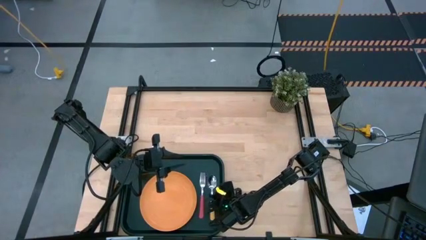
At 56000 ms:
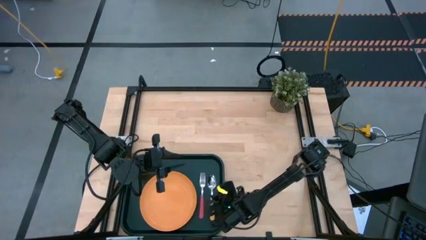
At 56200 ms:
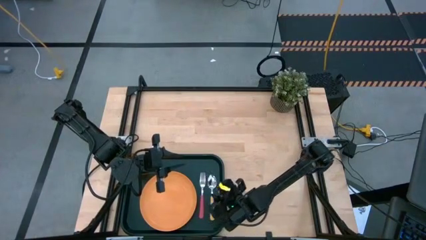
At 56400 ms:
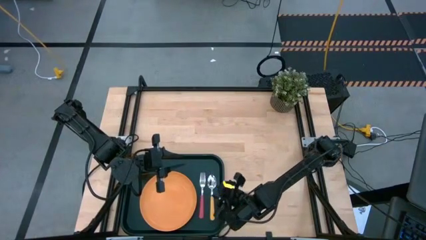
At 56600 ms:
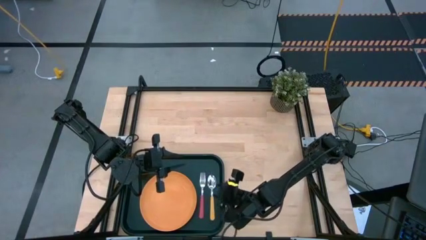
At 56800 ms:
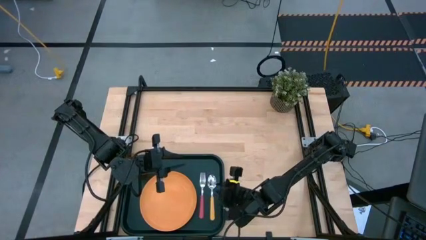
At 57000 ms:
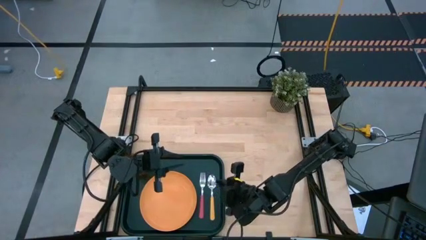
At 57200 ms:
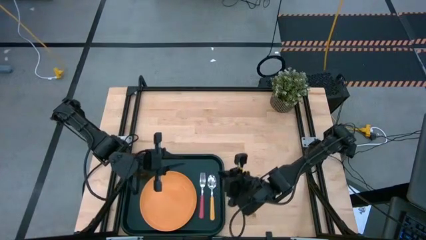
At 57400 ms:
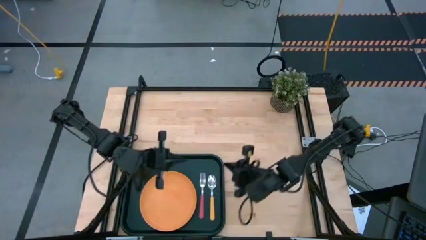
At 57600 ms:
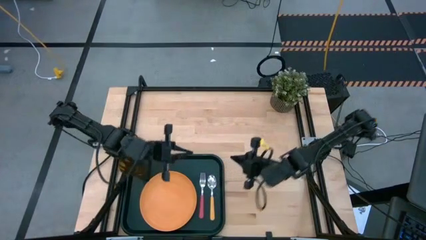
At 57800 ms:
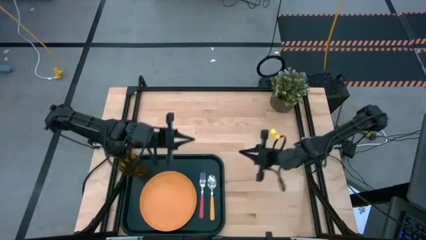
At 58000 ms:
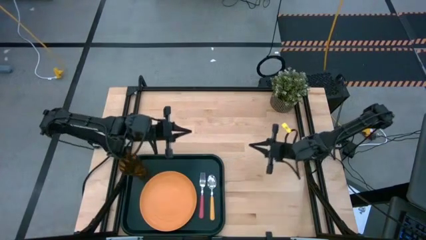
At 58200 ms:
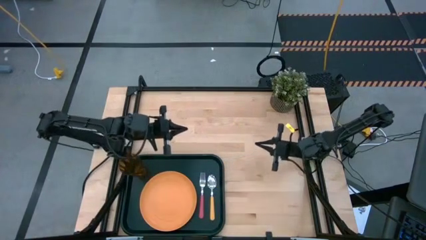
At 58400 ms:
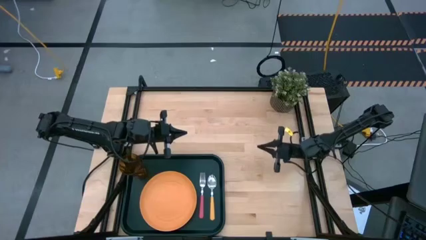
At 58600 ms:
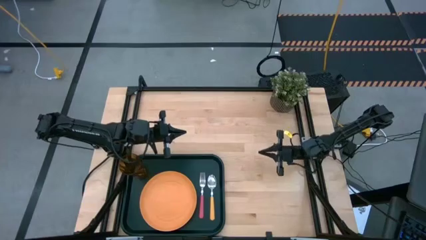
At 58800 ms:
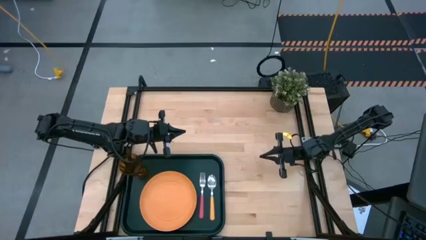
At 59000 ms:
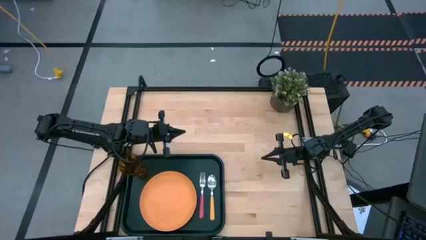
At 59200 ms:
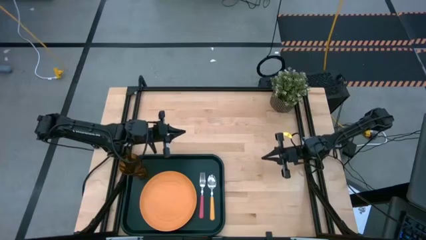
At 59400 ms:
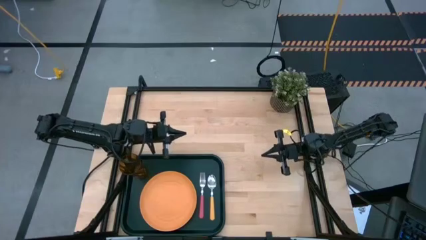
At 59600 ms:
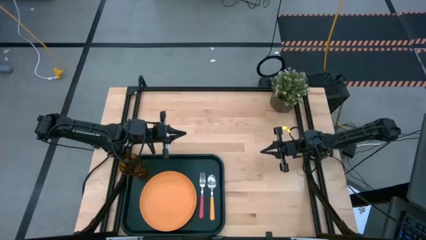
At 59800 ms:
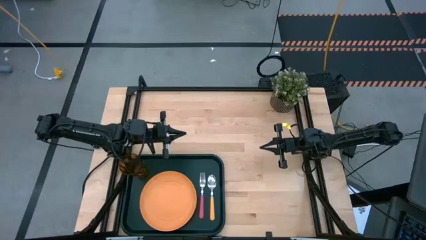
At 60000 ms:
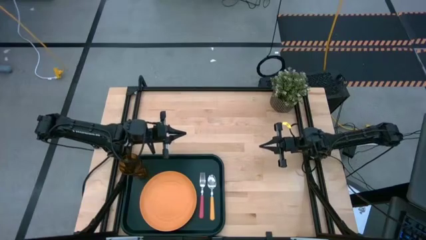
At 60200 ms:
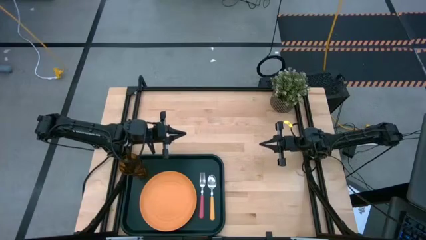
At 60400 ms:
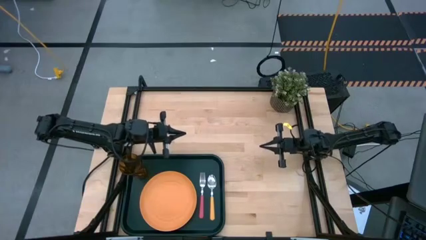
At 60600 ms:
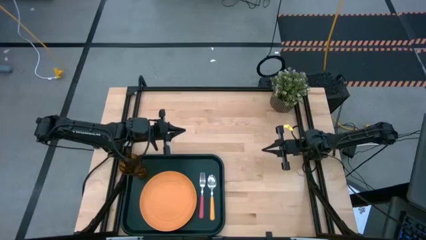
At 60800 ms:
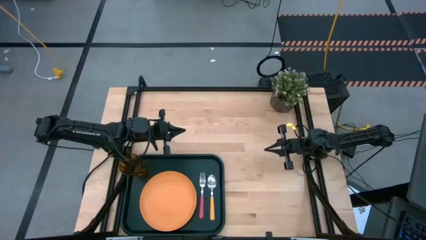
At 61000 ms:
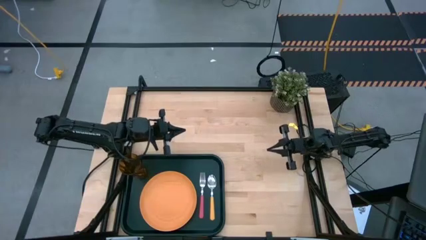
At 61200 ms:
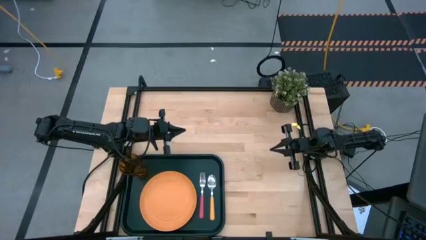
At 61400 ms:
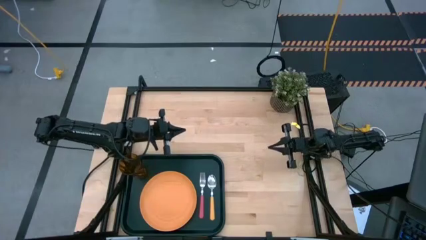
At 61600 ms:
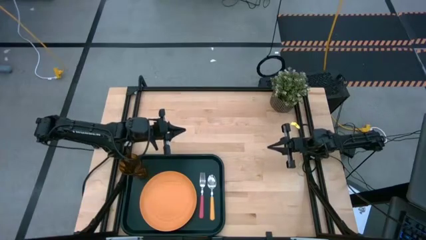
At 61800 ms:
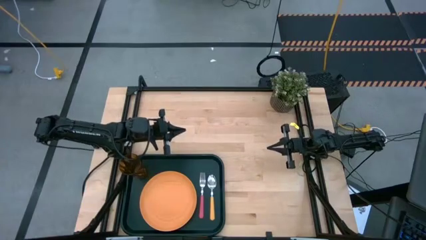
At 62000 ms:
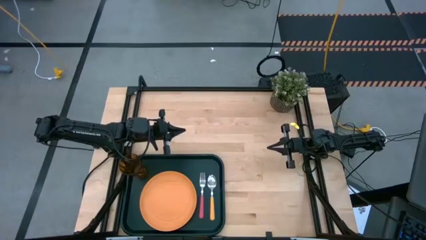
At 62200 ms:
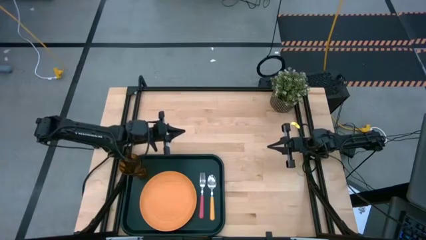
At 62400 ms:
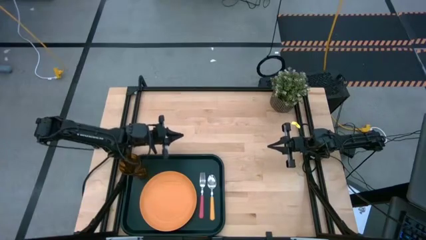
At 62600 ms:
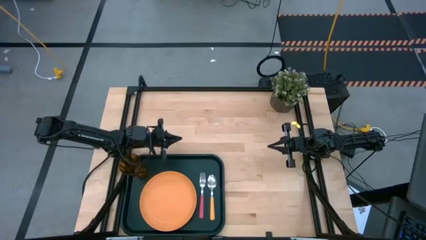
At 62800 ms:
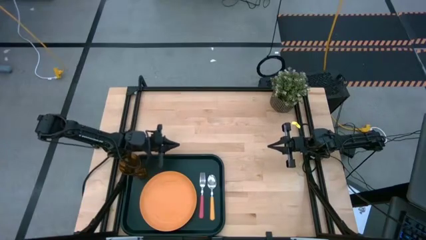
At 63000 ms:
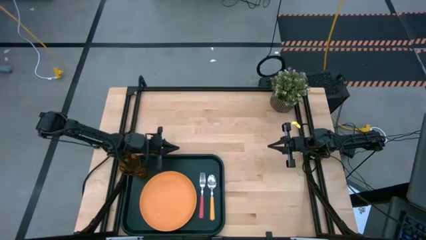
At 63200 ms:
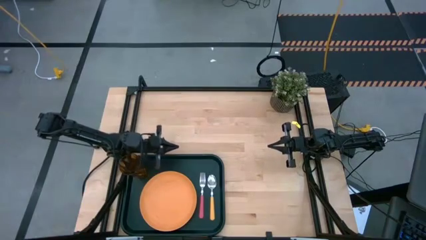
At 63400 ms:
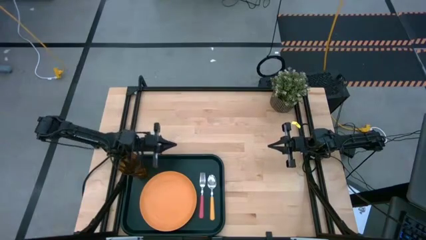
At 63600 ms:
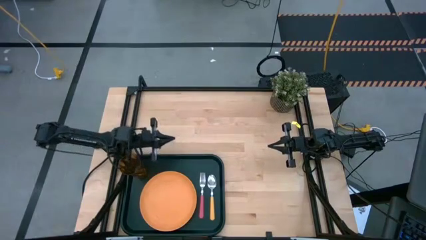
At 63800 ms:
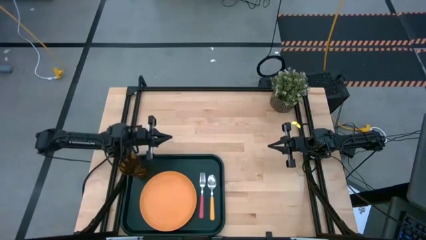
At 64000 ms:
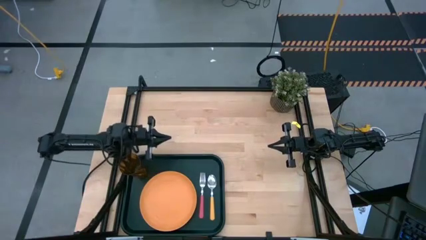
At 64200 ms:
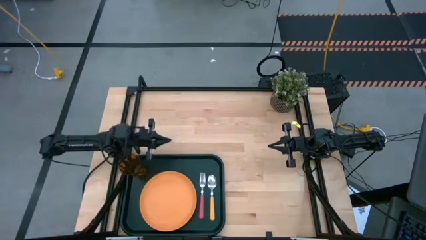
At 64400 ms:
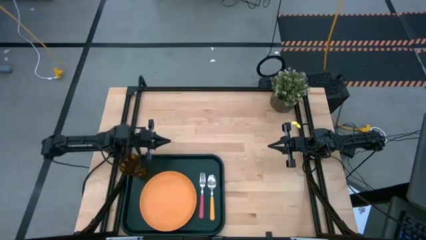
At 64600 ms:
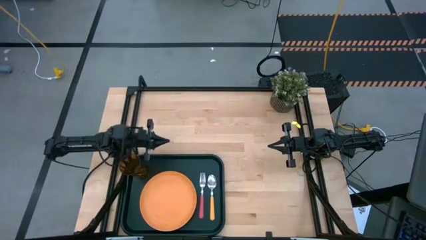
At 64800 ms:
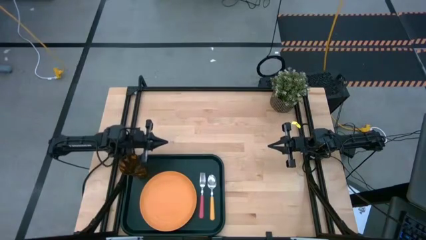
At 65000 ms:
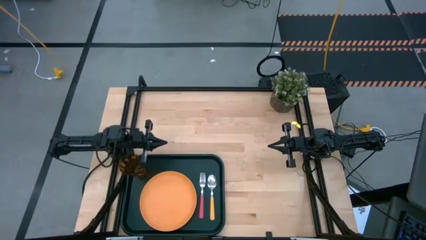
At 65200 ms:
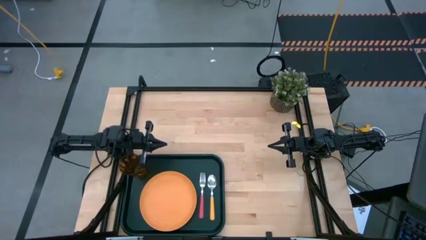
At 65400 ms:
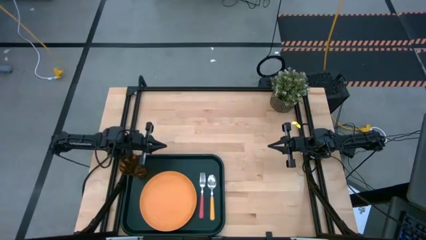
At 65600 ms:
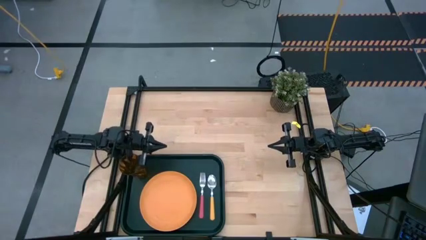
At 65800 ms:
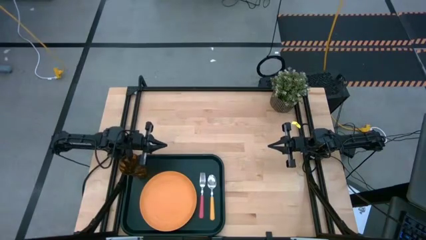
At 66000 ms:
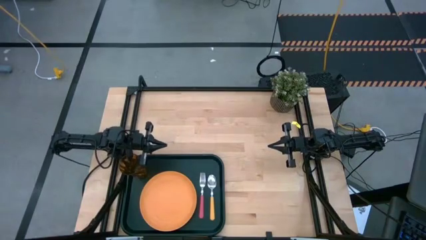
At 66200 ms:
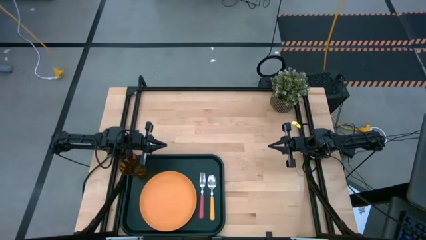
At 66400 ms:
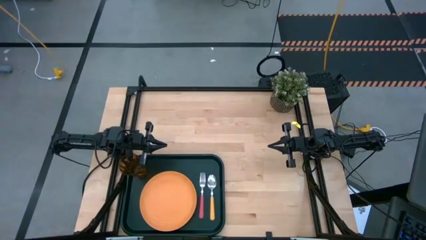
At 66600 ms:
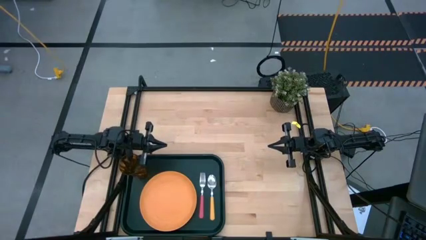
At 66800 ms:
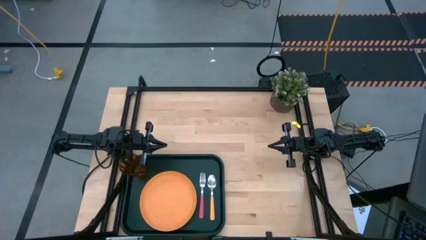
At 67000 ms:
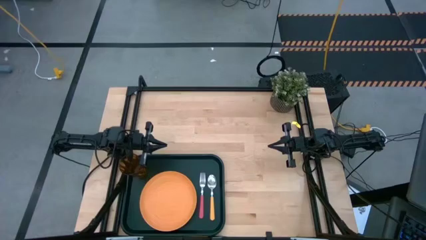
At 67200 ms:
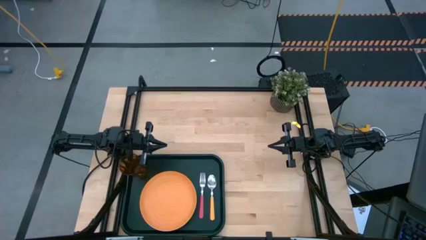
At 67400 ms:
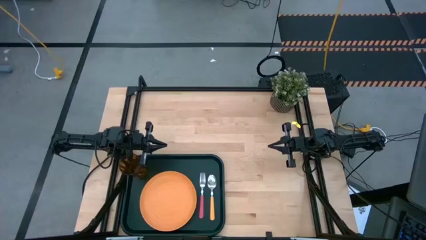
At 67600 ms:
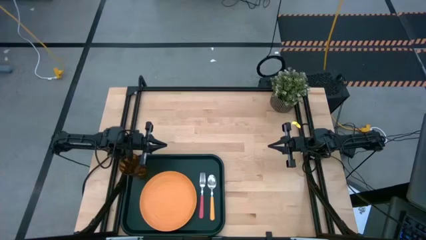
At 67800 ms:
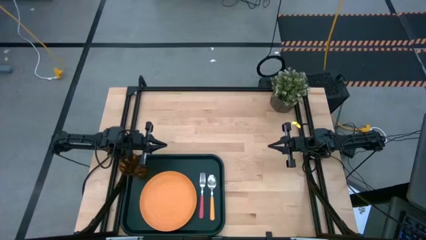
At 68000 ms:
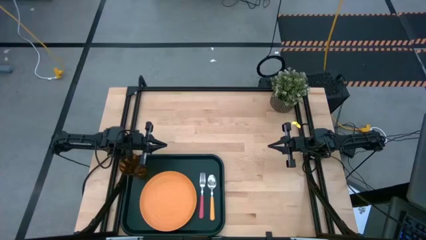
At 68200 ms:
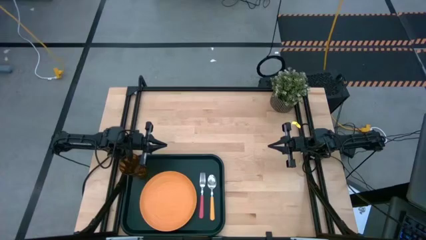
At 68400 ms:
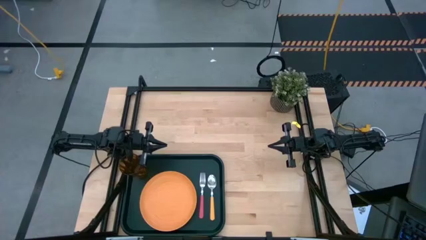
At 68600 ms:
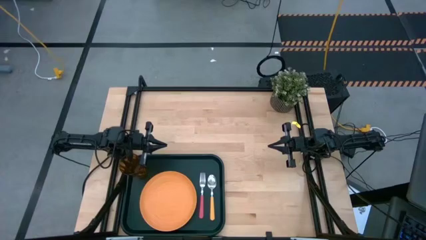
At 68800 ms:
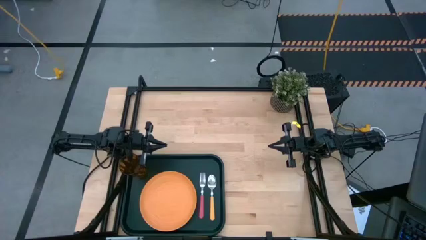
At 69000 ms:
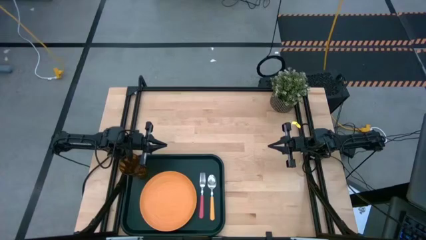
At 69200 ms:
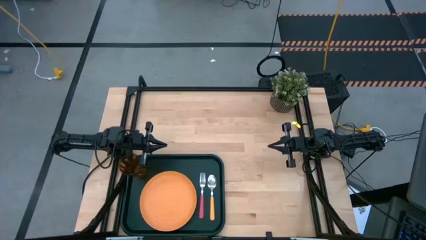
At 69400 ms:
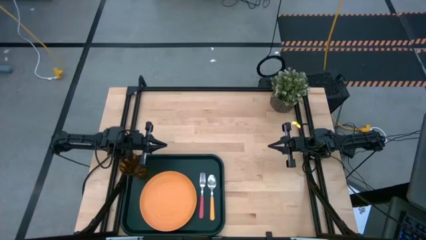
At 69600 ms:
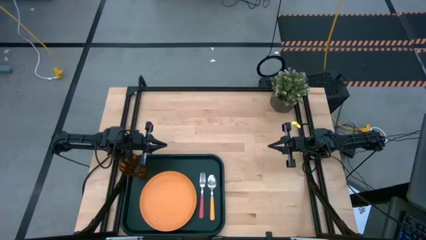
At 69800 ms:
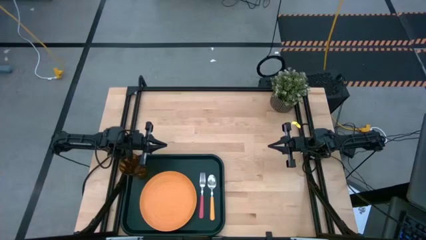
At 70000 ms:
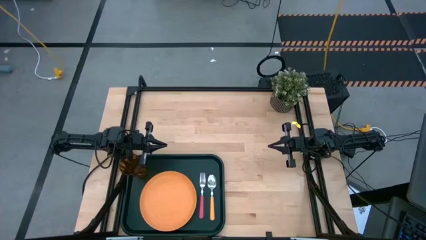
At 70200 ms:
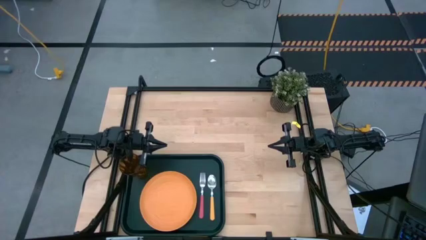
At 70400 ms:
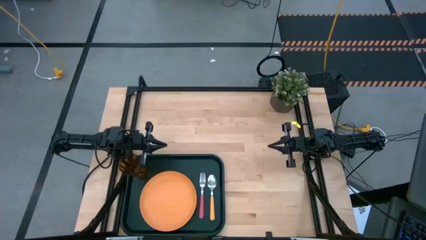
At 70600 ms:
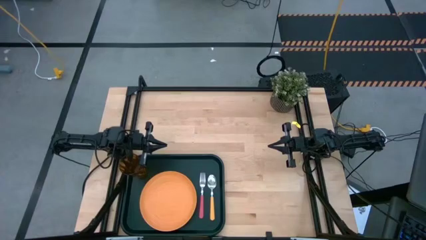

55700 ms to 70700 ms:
Task: Pick and place plate/cup/fork/spoon on tray
Return to Home Position
